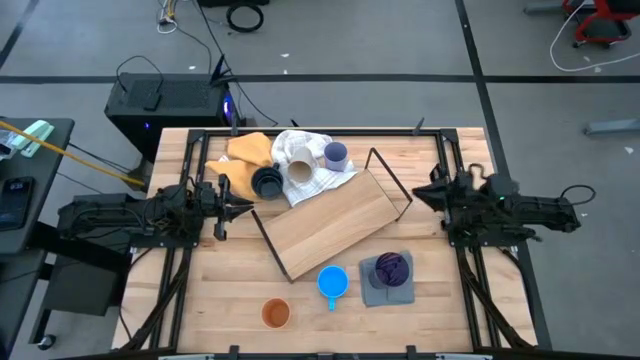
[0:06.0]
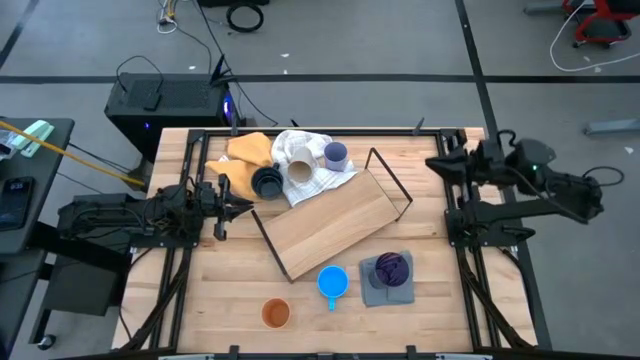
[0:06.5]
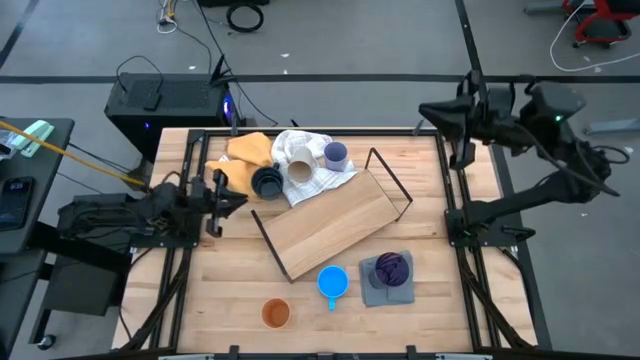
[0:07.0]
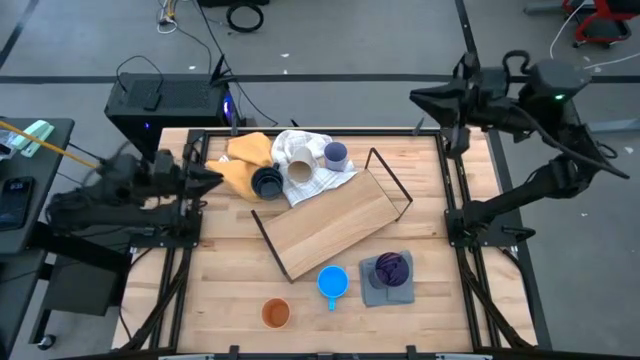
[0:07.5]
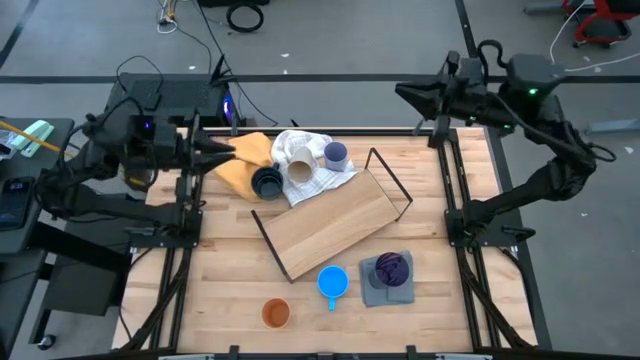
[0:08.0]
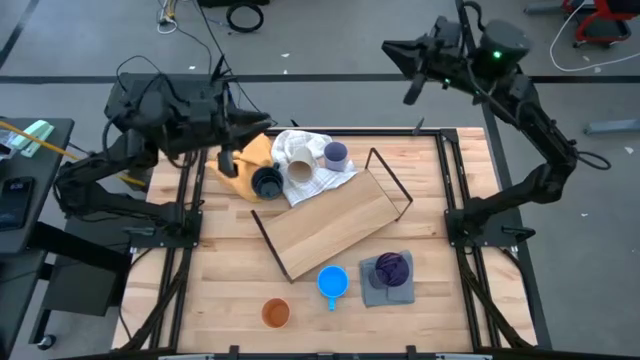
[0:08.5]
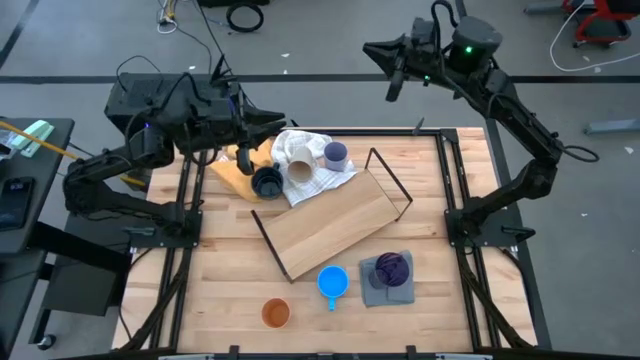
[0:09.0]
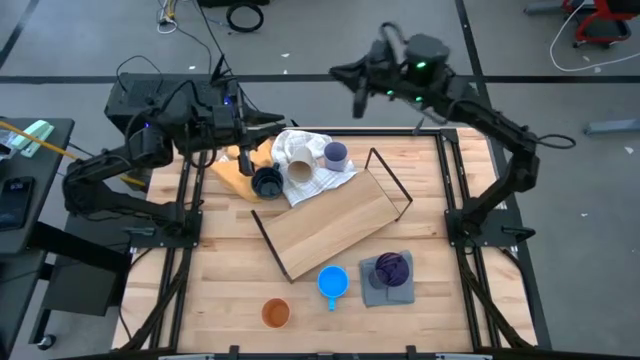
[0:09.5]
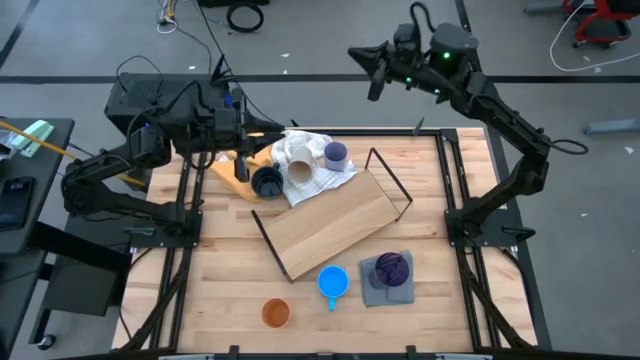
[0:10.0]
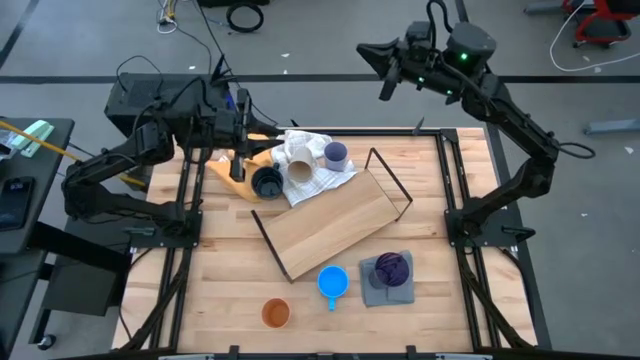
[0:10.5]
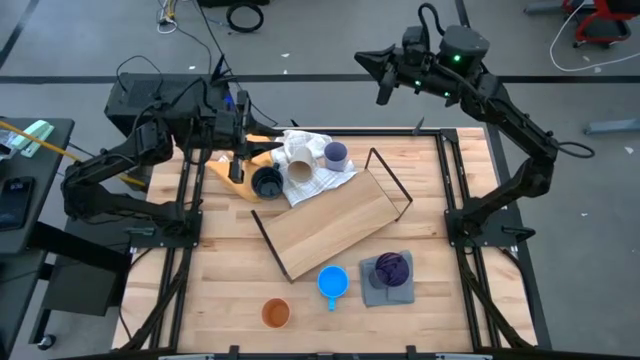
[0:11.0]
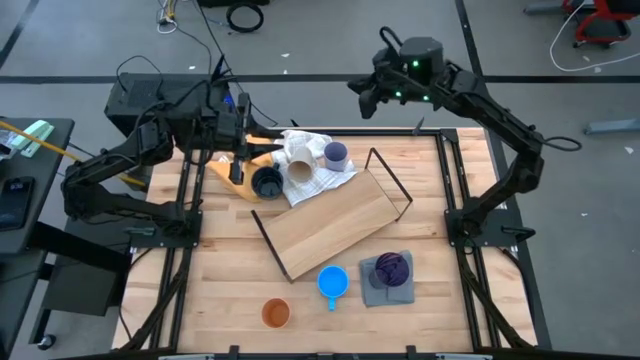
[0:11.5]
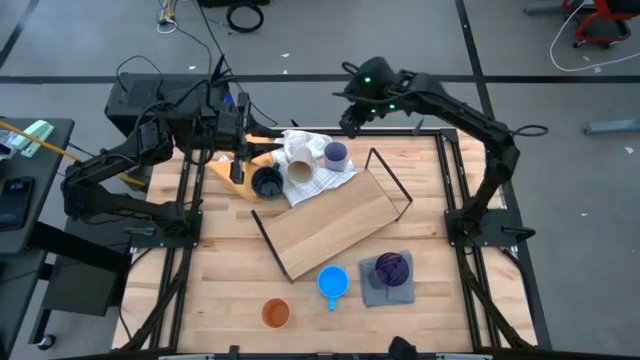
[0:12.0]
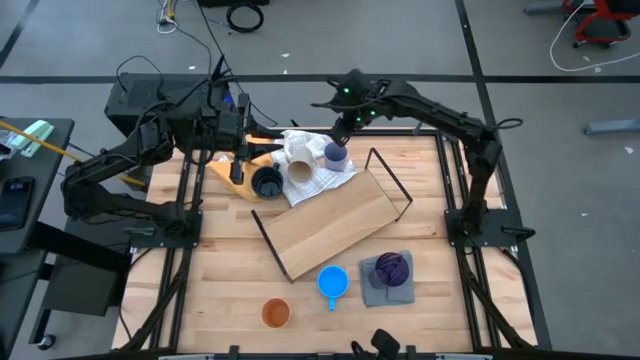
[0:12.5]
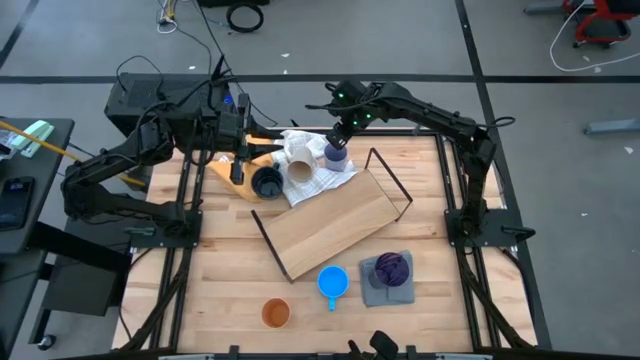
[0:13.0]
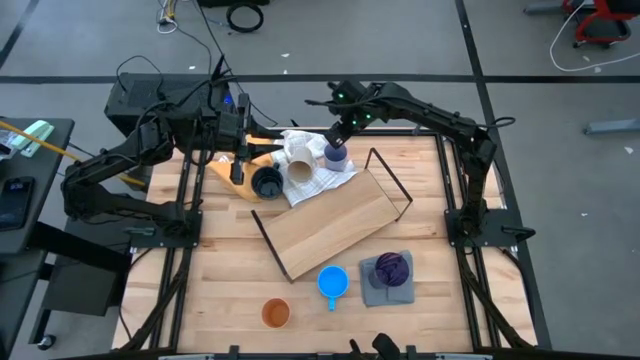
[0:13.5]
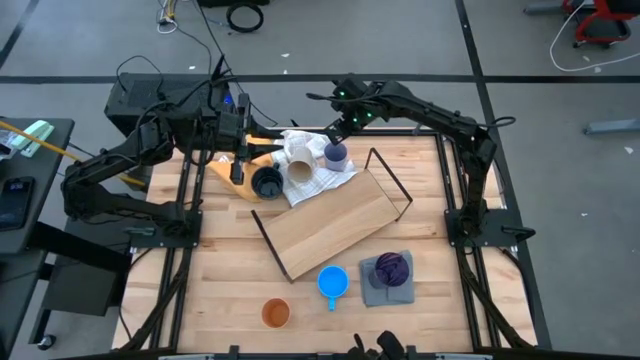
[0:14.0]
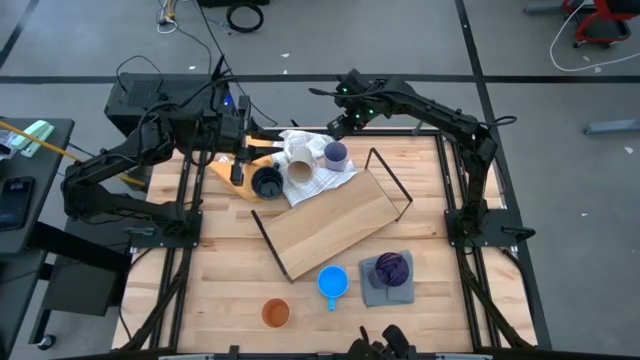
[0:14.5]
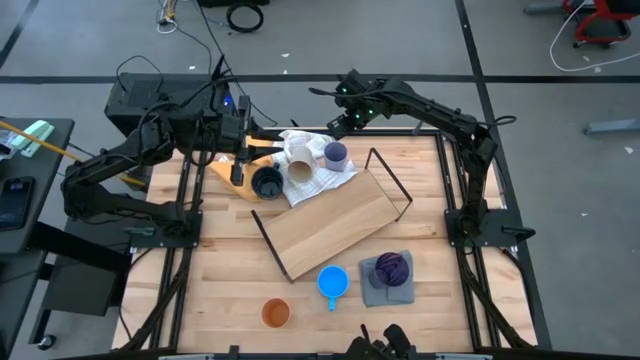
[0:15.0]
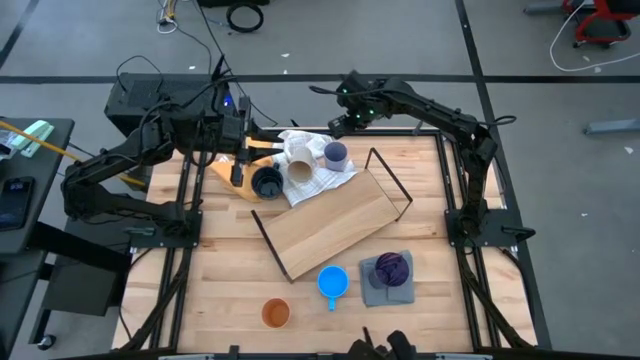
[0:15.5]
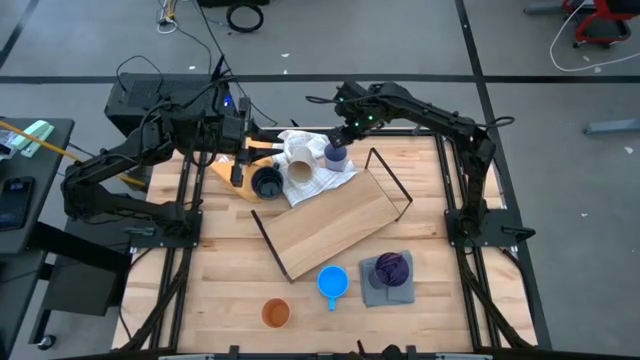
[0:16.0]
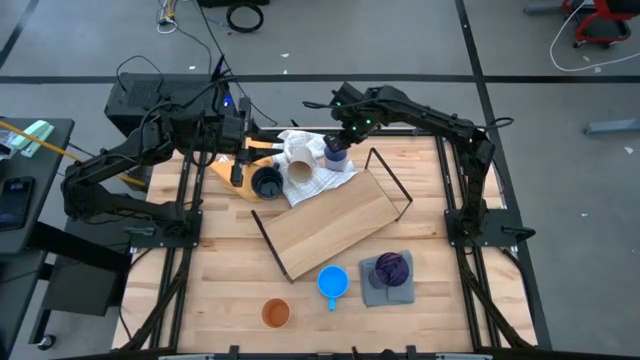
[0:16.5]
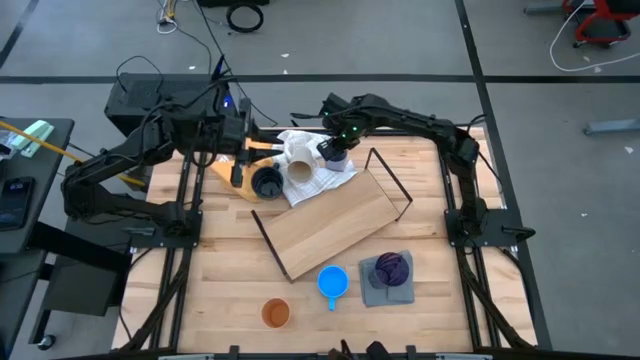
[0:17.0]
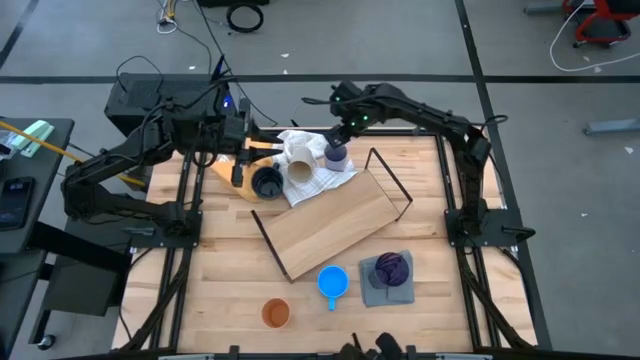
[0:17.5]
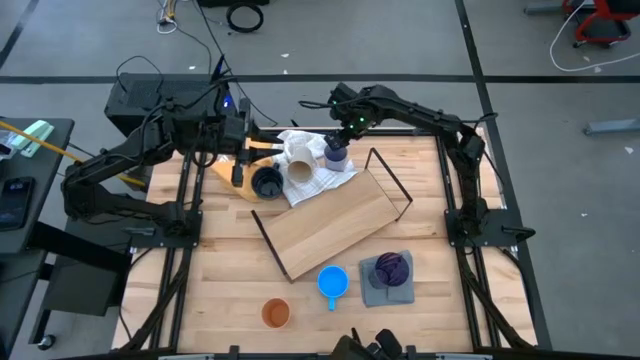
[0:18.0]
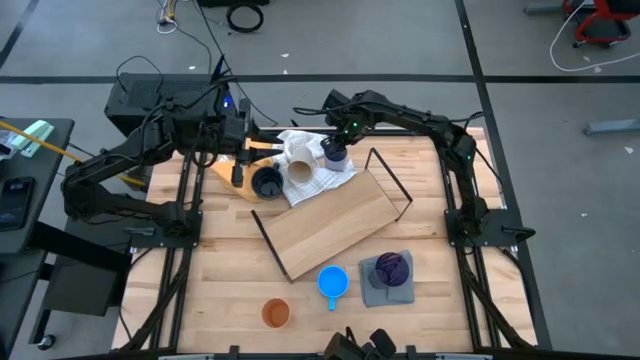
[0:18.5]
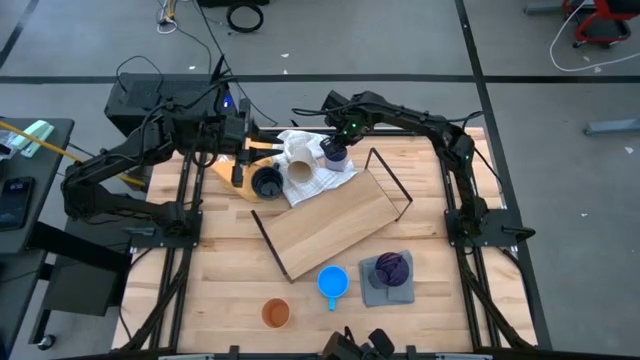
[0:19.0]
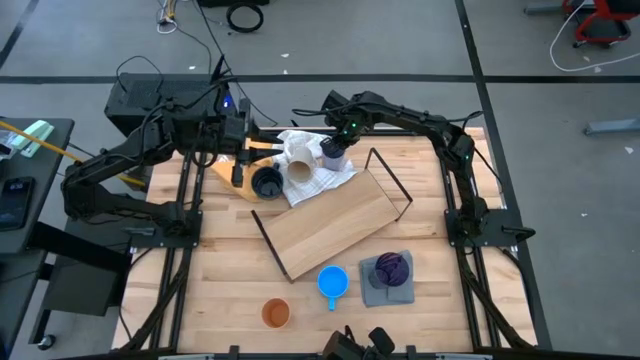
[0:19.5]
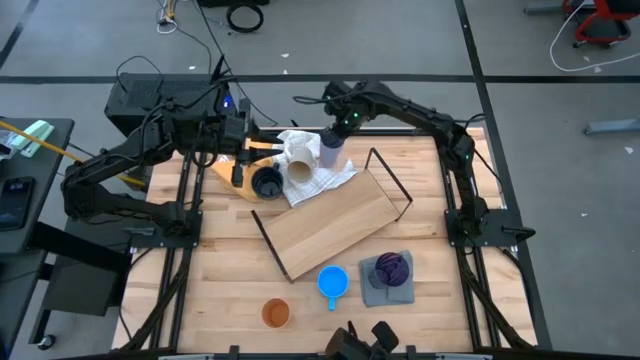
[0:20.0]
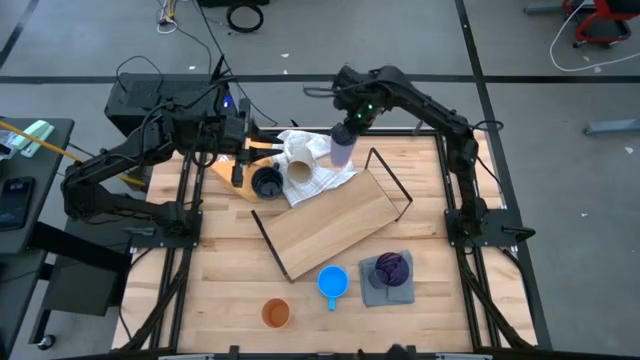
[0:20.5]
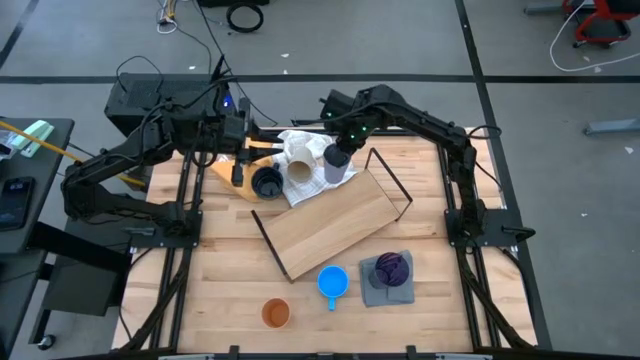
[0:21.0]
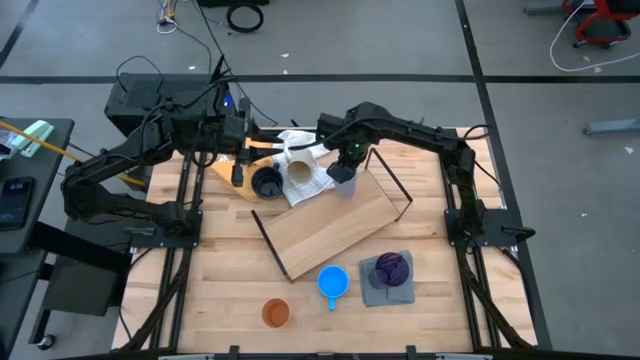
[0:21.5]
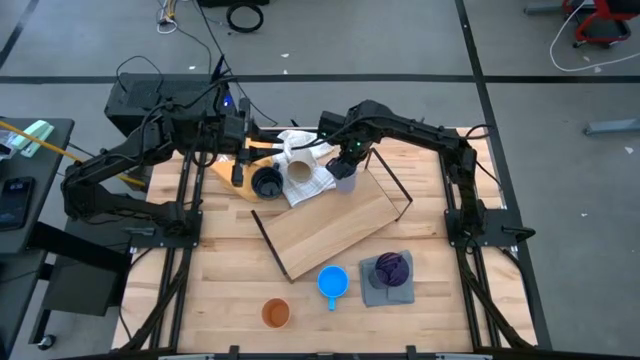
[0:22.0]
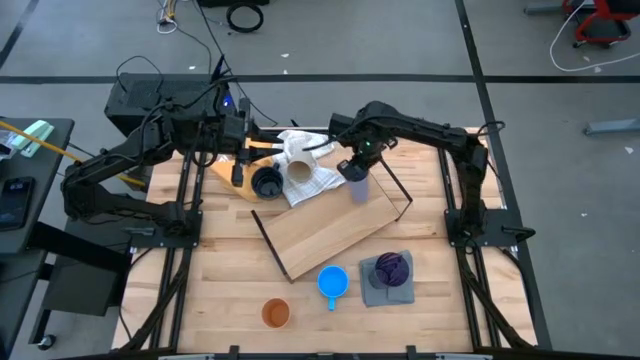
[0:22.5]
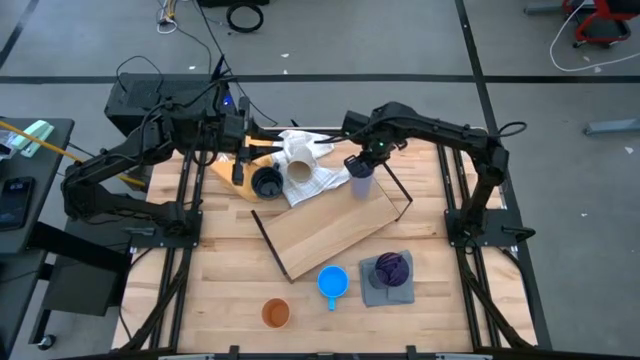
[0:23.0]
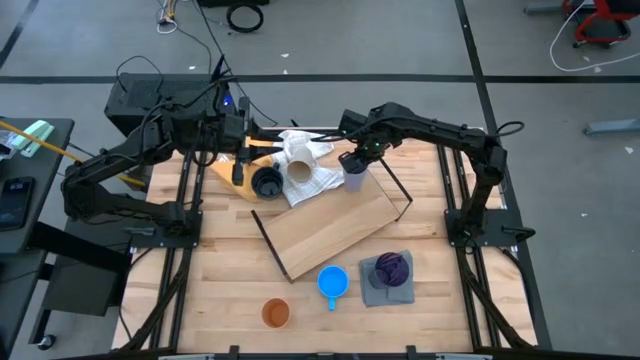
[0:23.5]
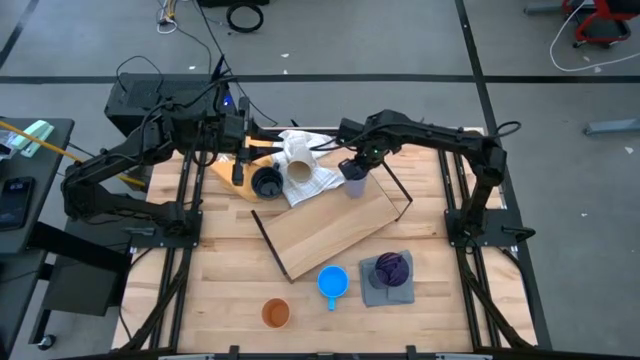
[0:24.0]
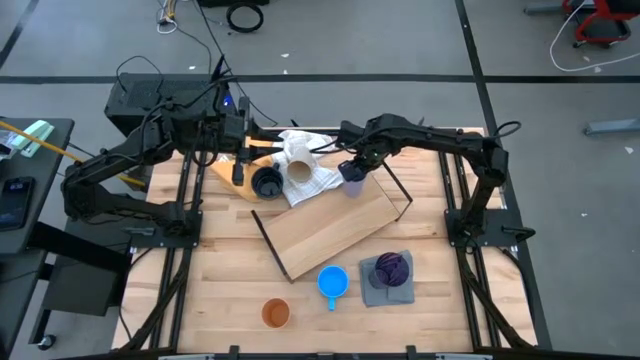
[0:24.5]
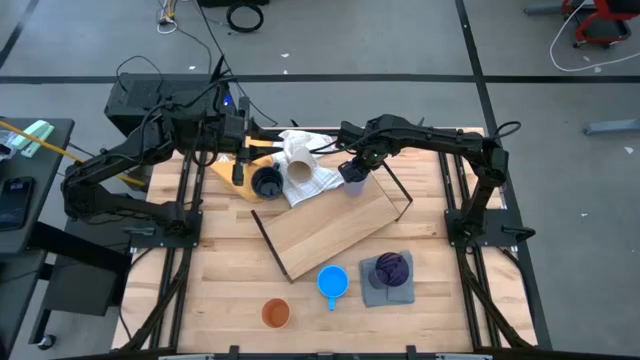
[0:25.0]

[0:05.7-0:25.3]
Task: Stack small to large cups/mugs on shelf
Put the violet cup on the shelf
